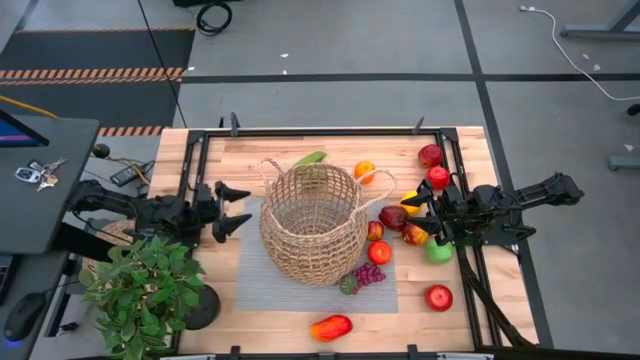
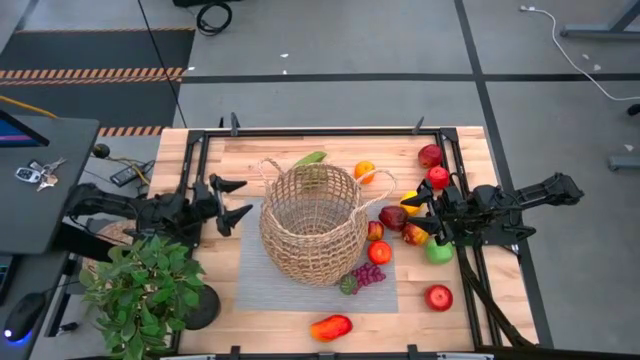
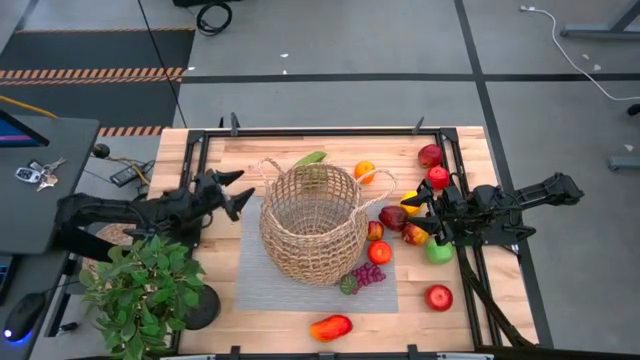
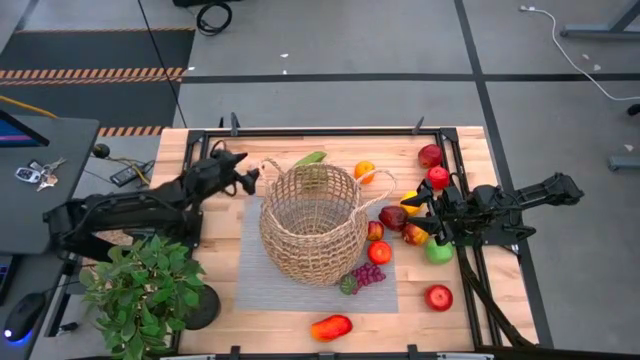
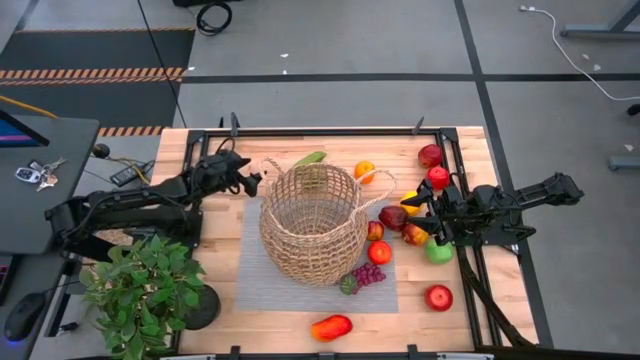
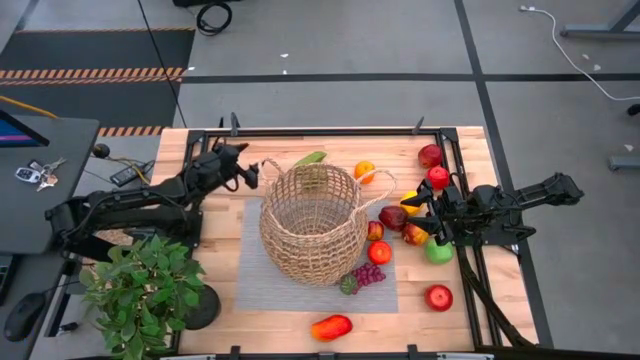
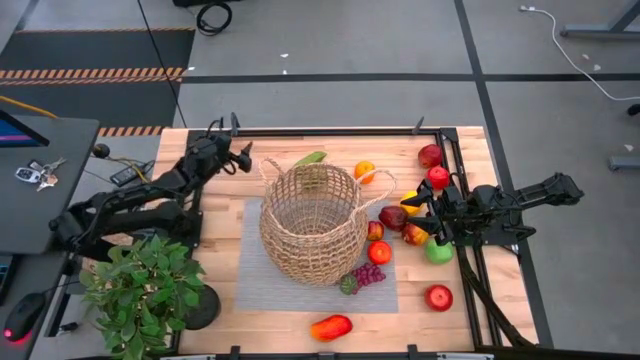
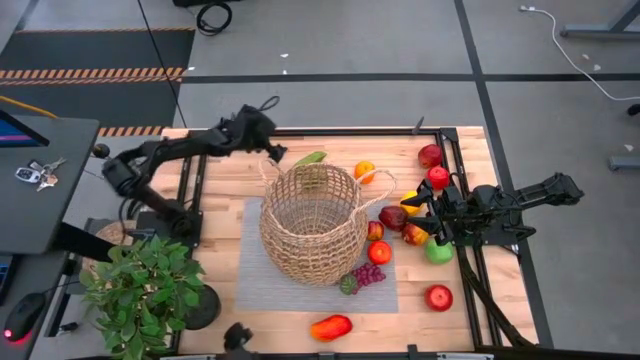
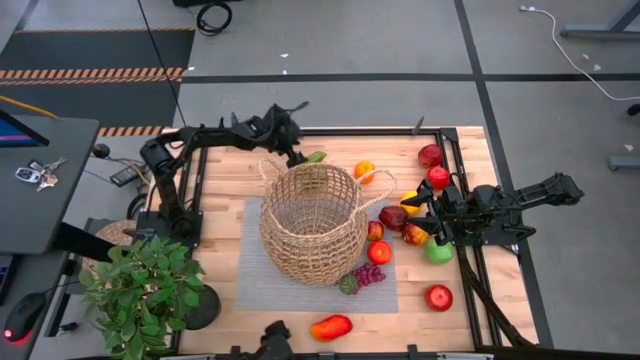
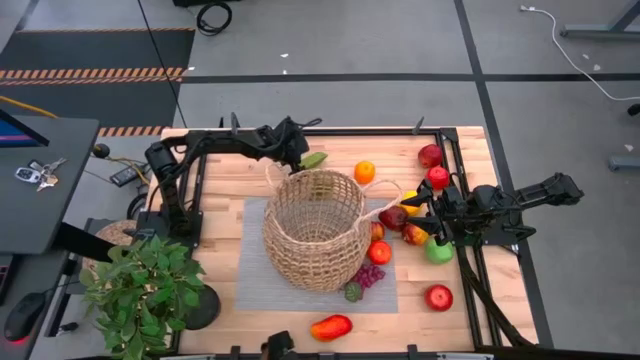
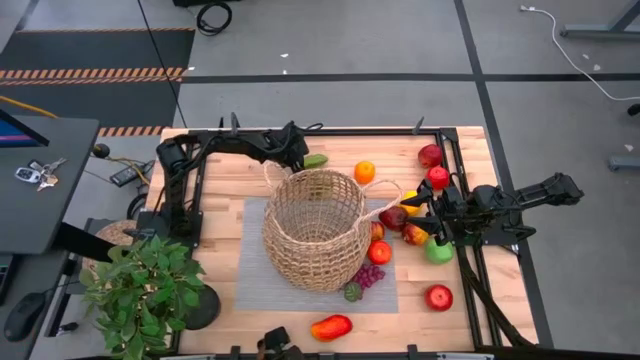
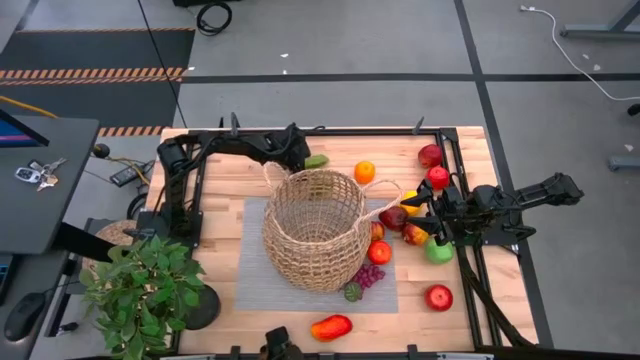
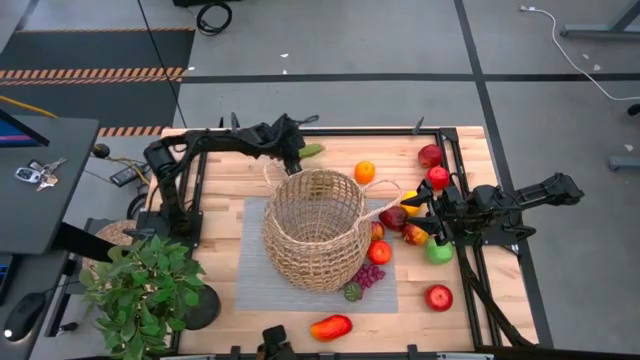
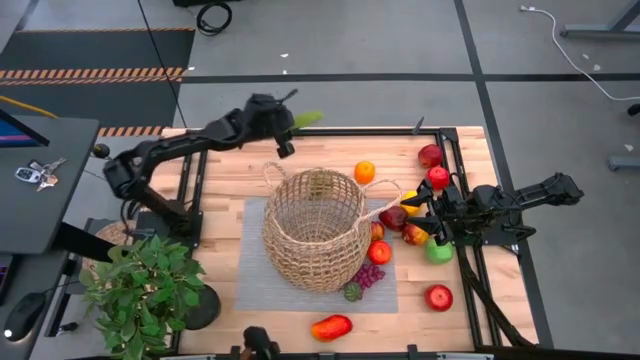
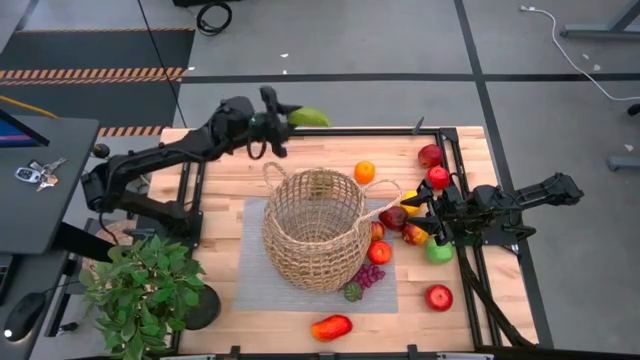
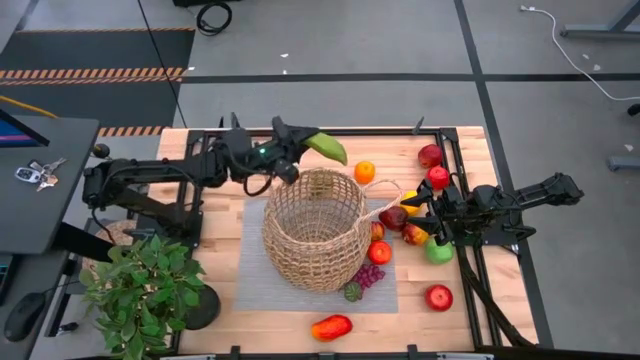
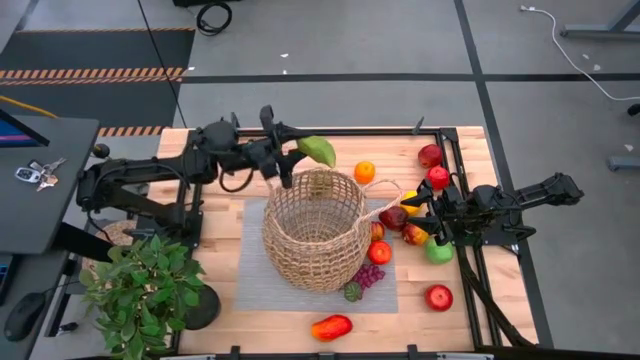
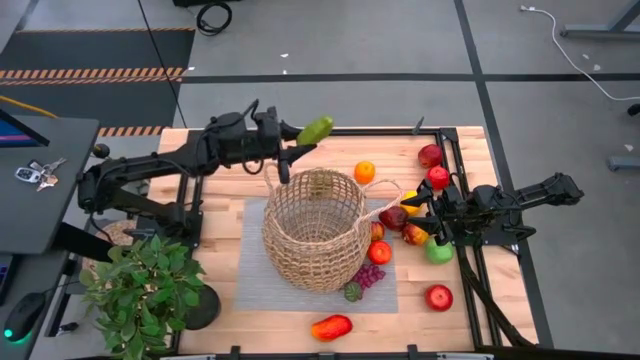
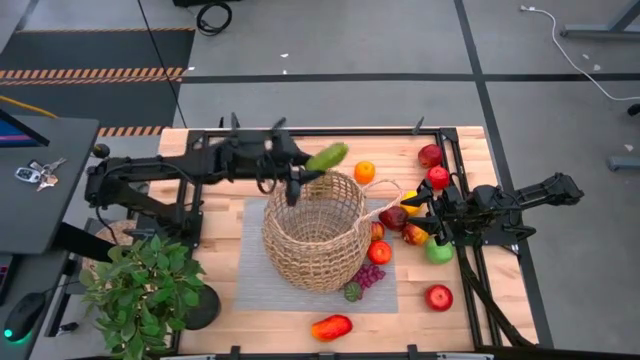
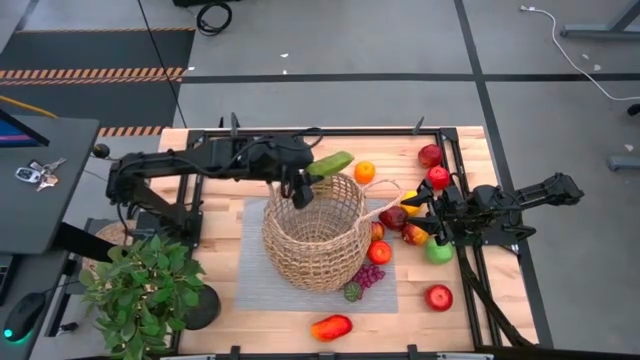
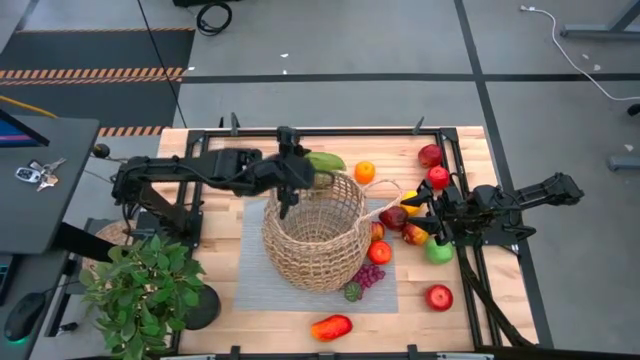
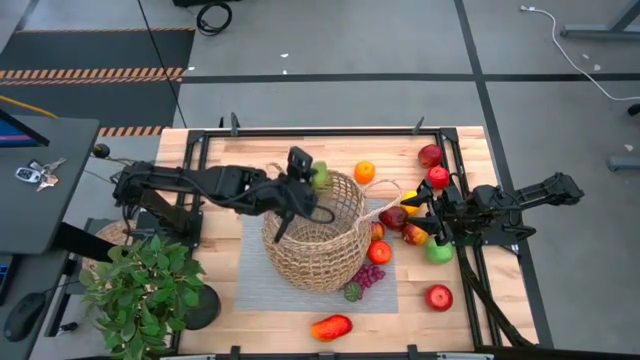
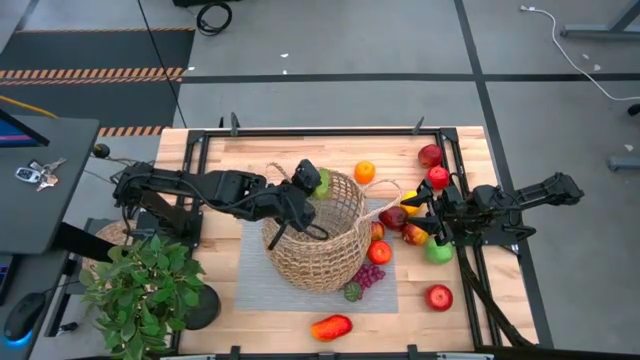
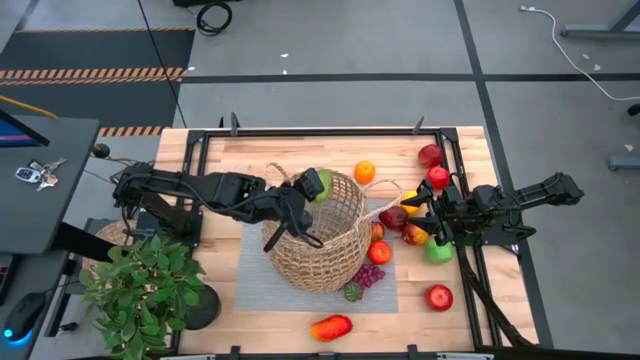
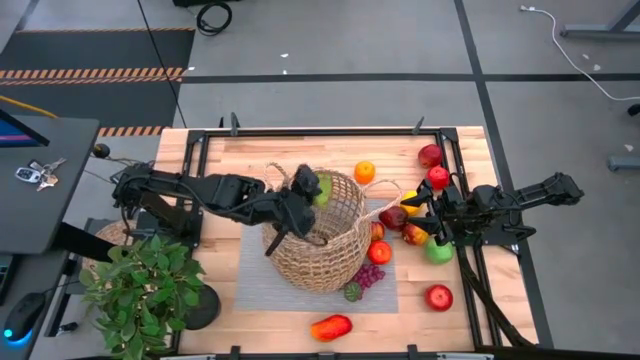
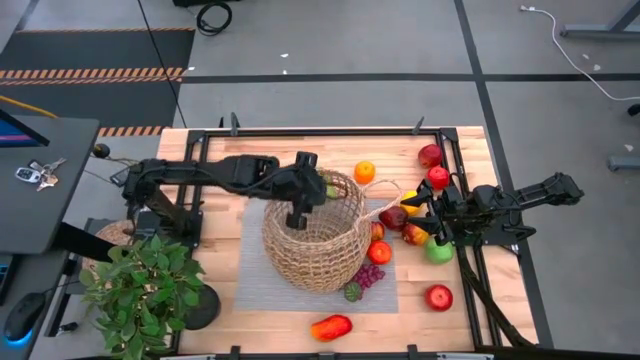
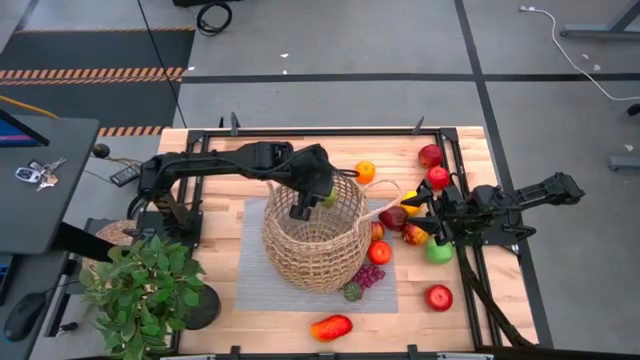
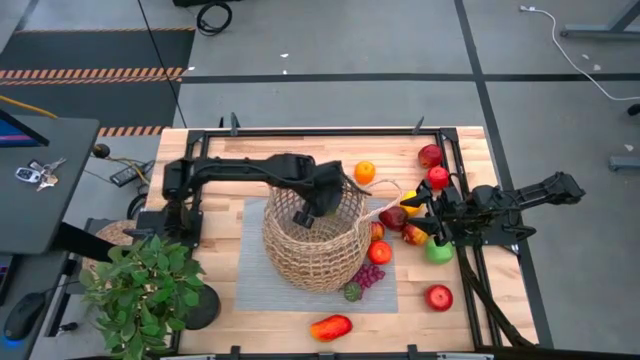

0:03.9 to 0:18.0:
Task: Build produce basket
Put the green cucumber into the brown basket

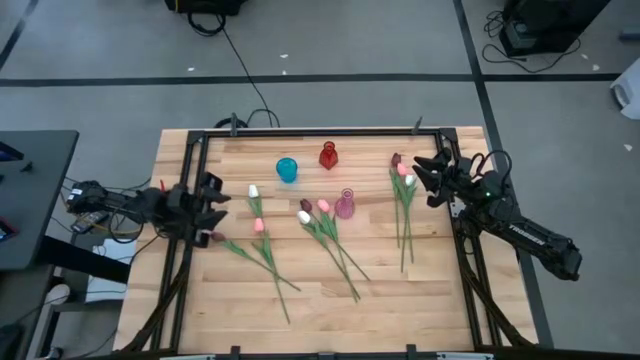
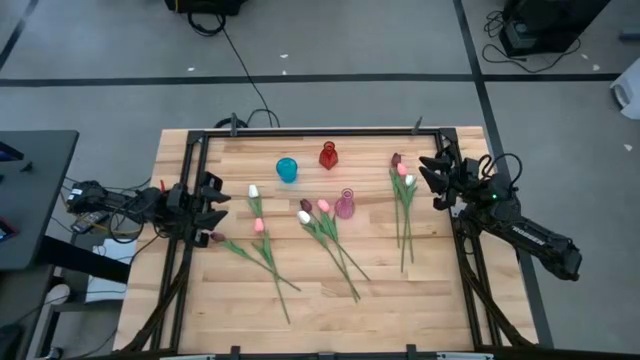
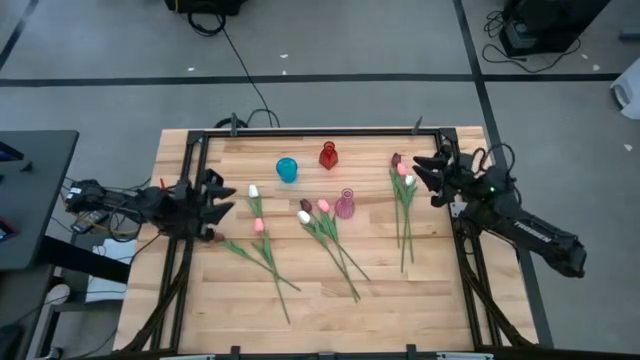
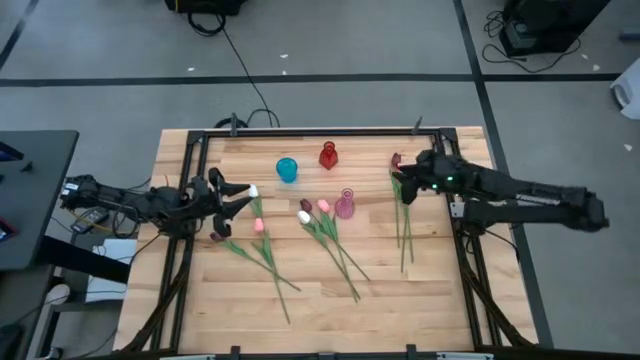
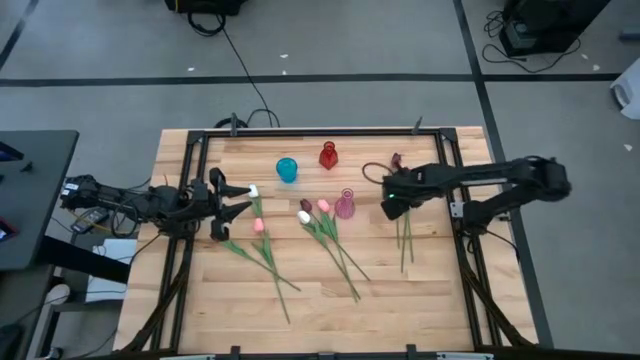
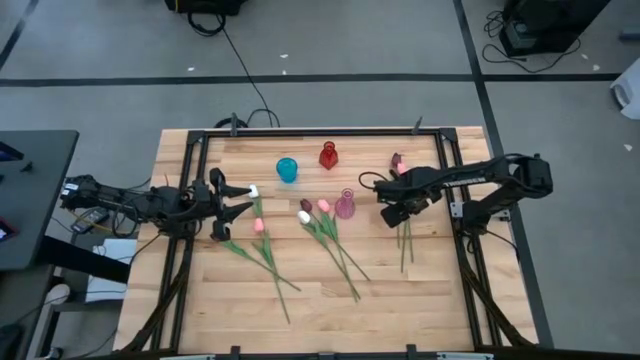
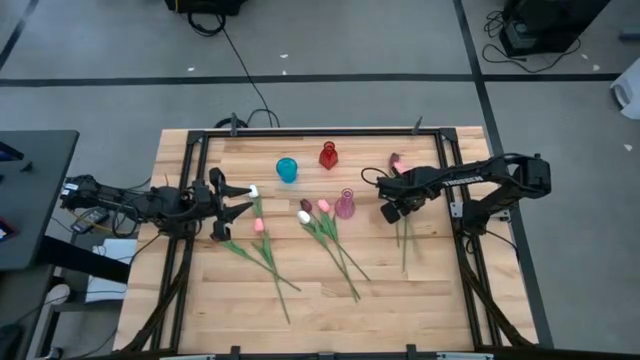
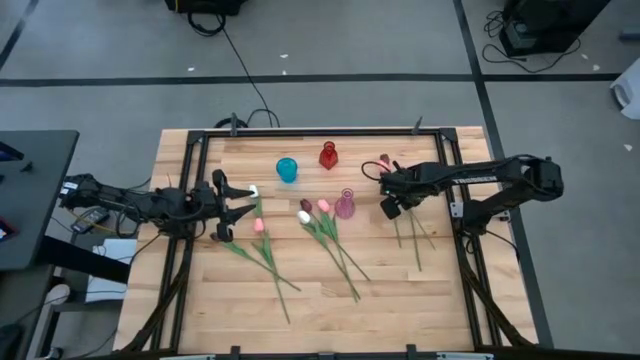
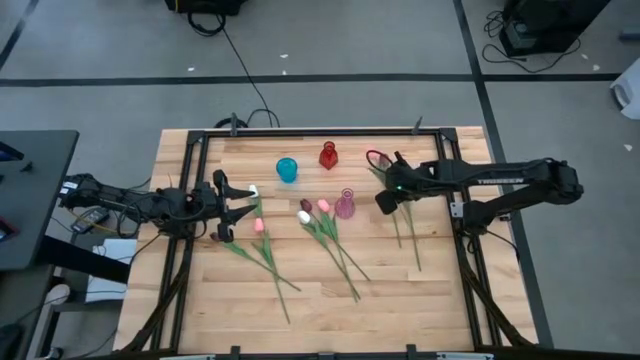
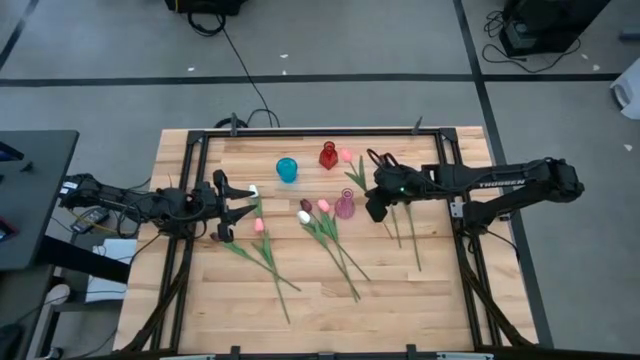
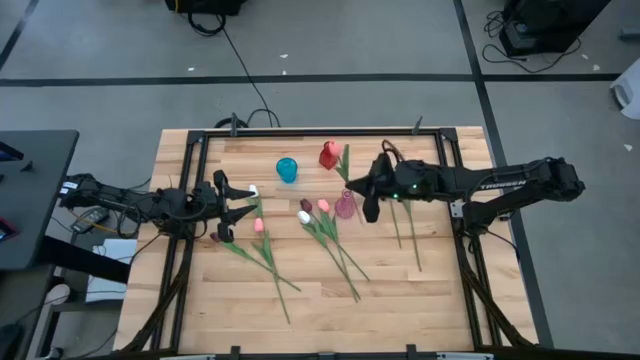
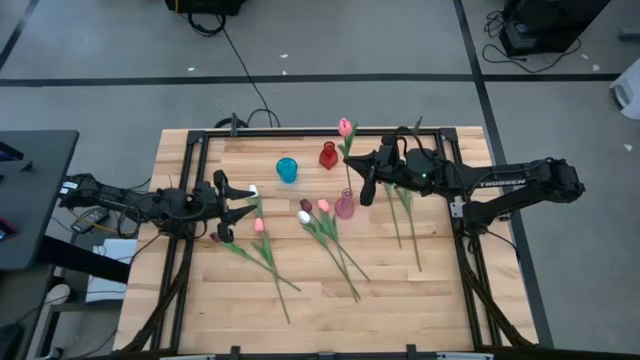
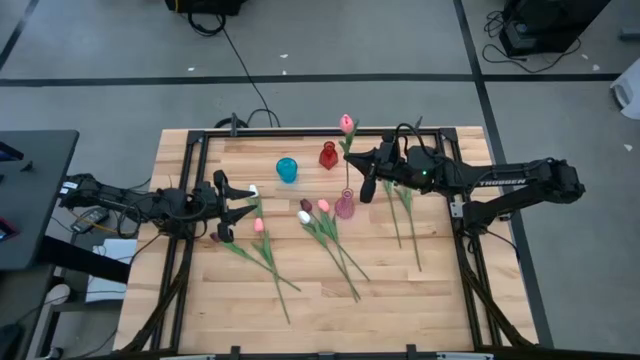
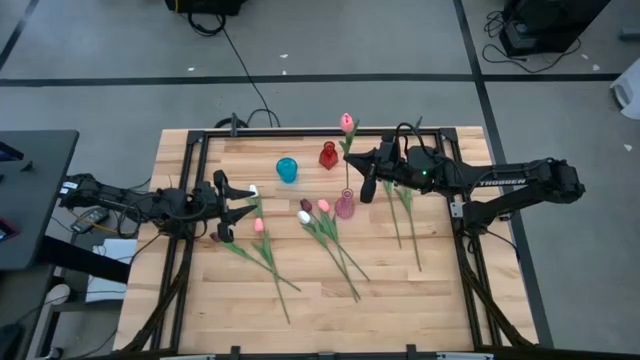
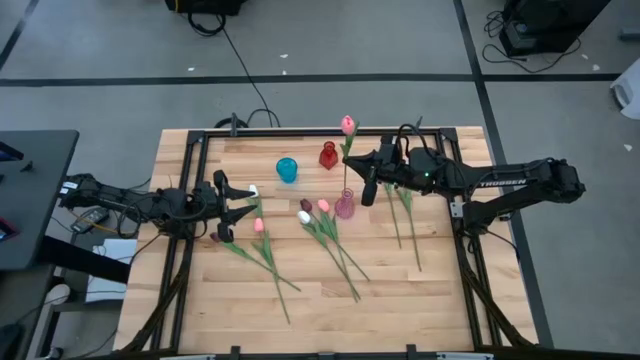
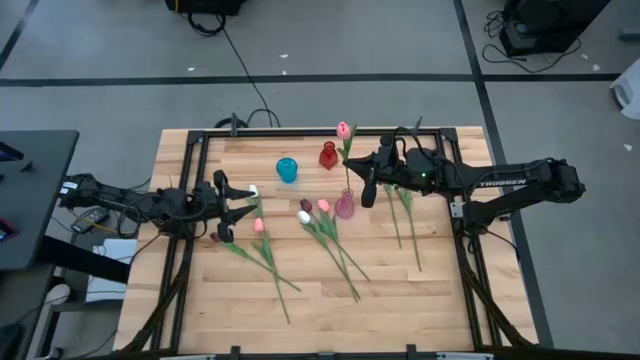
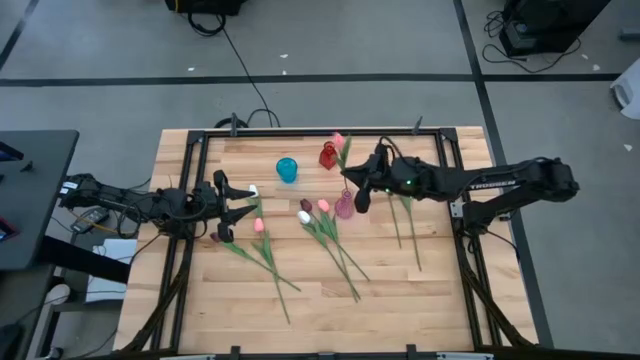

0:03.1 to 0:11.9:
Task: Sort flowers into vase by color
Put the top pink tulip into the violet vase
